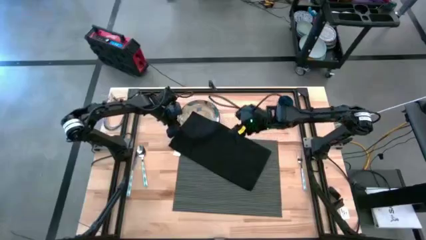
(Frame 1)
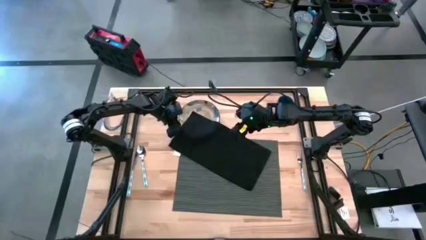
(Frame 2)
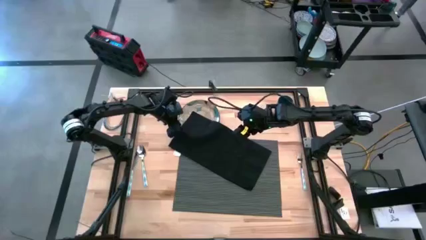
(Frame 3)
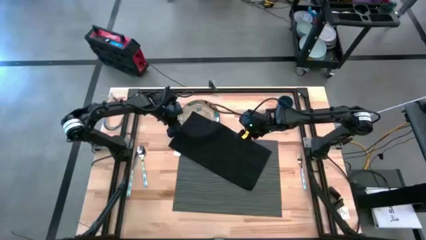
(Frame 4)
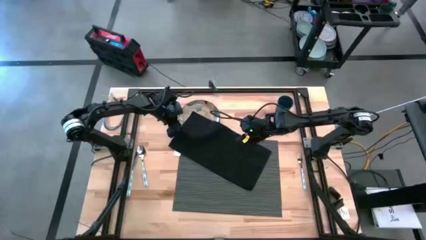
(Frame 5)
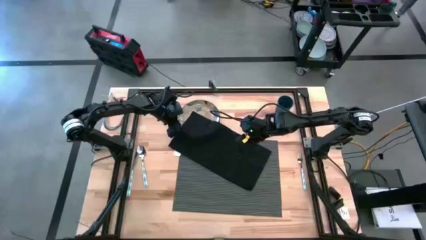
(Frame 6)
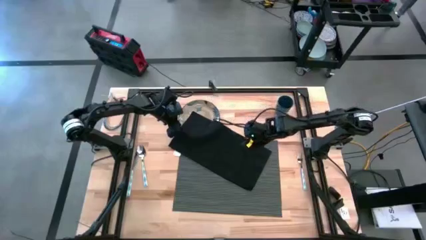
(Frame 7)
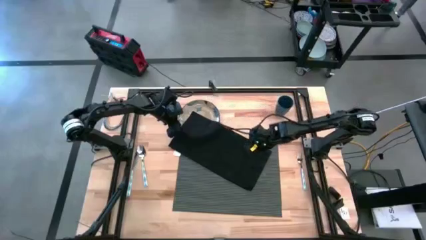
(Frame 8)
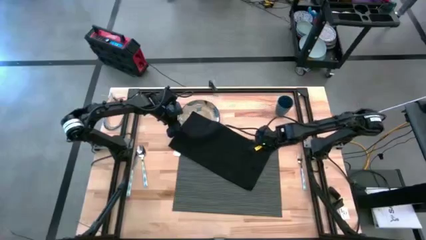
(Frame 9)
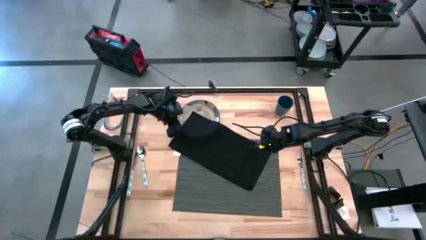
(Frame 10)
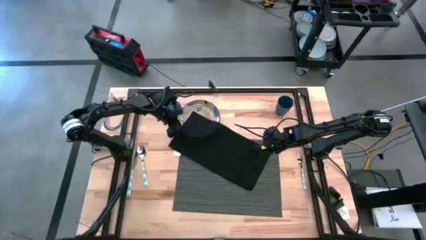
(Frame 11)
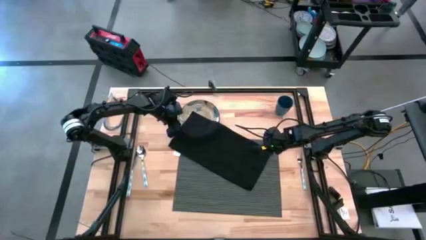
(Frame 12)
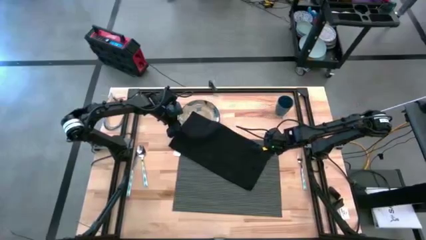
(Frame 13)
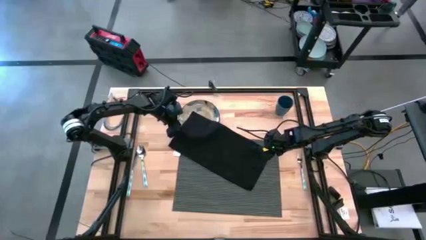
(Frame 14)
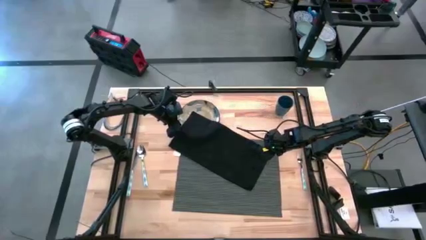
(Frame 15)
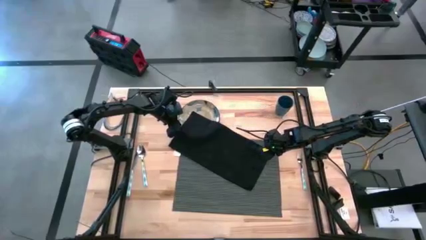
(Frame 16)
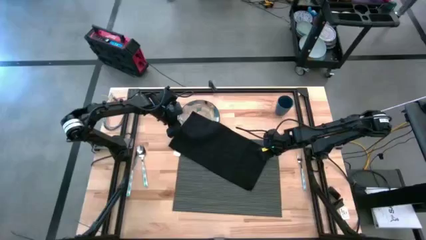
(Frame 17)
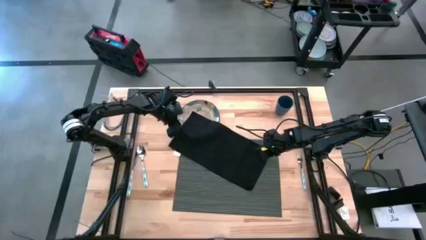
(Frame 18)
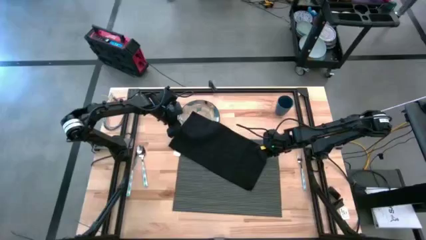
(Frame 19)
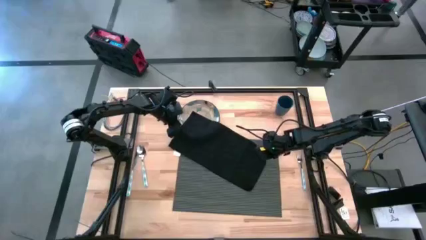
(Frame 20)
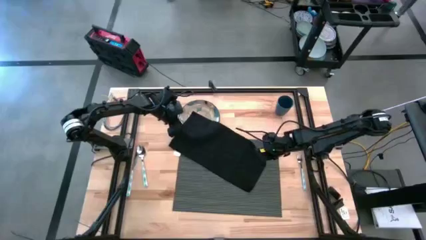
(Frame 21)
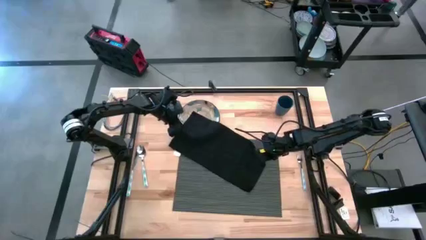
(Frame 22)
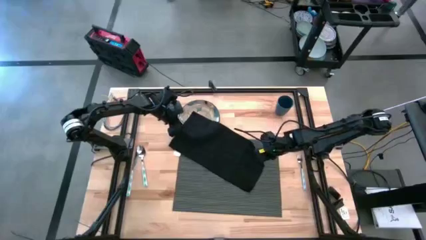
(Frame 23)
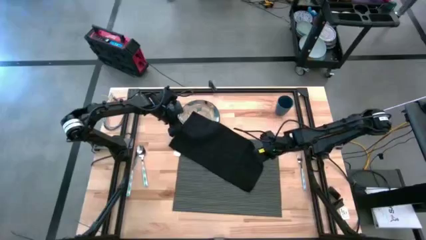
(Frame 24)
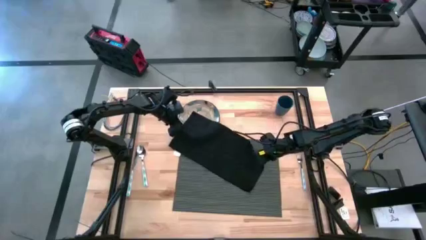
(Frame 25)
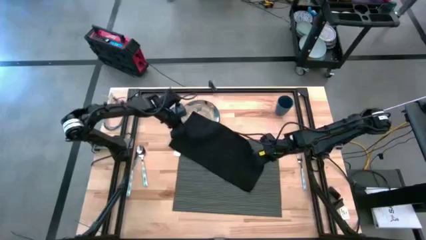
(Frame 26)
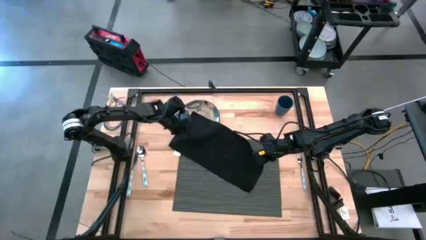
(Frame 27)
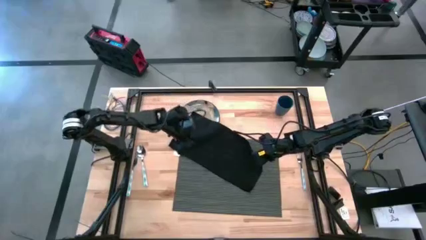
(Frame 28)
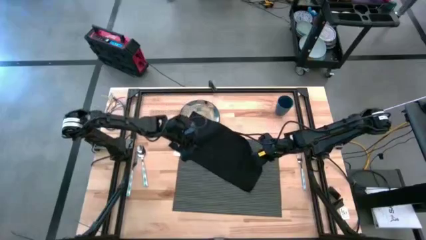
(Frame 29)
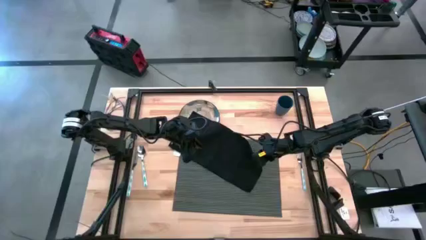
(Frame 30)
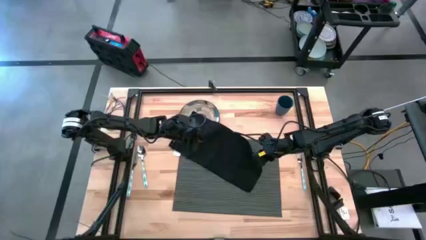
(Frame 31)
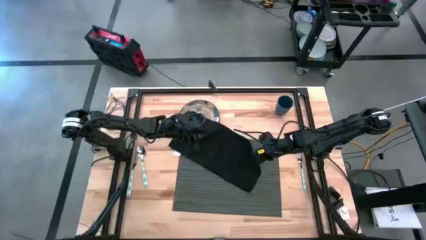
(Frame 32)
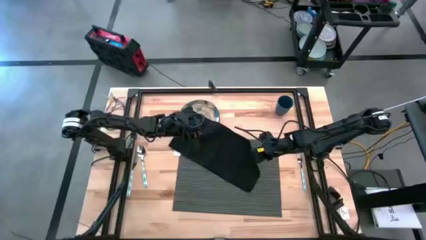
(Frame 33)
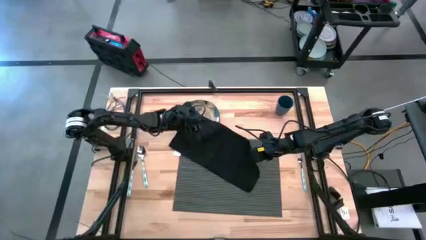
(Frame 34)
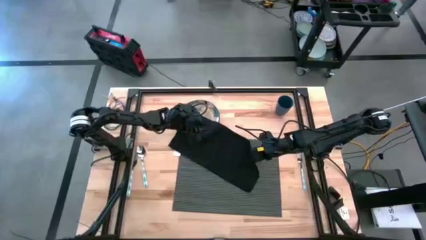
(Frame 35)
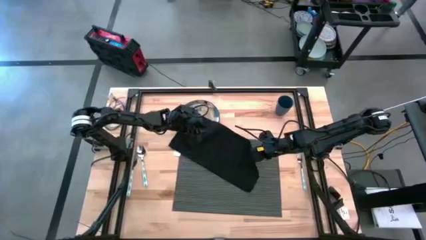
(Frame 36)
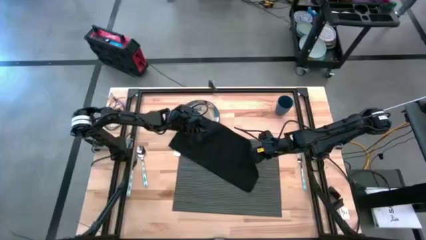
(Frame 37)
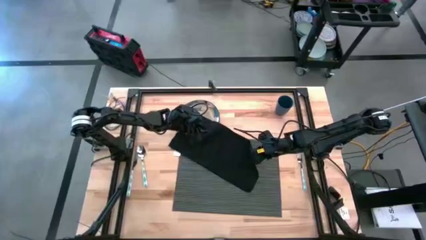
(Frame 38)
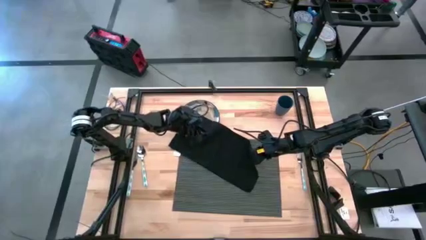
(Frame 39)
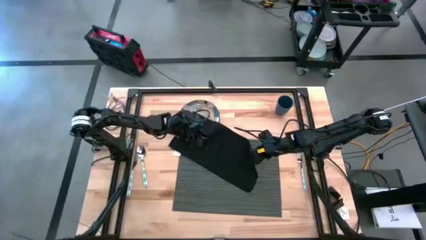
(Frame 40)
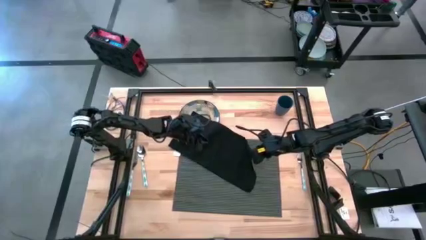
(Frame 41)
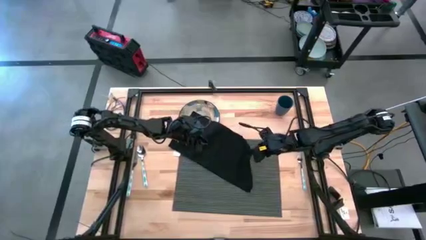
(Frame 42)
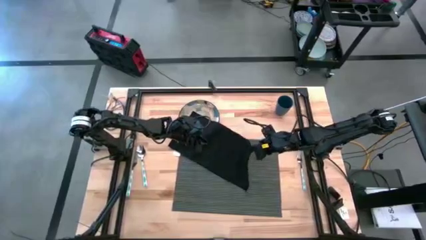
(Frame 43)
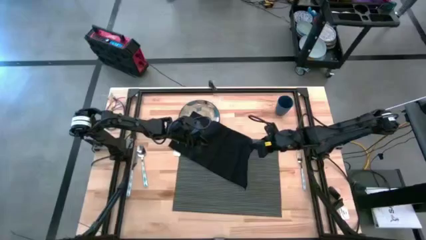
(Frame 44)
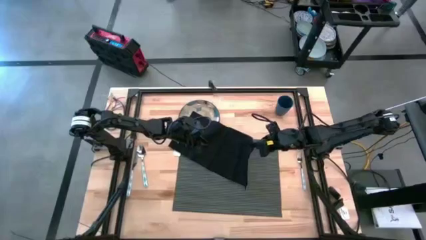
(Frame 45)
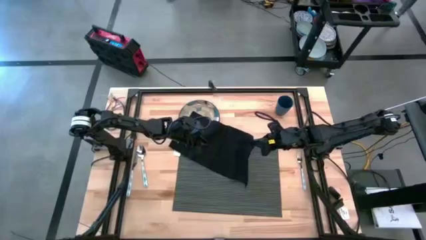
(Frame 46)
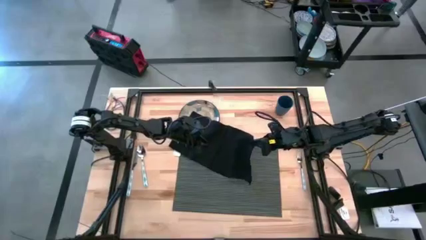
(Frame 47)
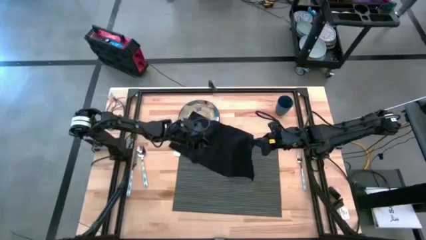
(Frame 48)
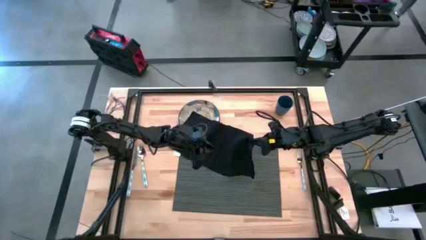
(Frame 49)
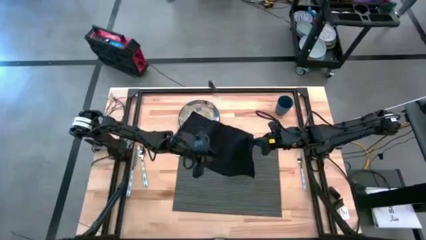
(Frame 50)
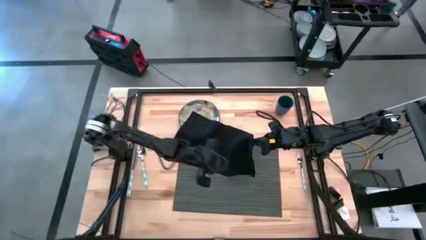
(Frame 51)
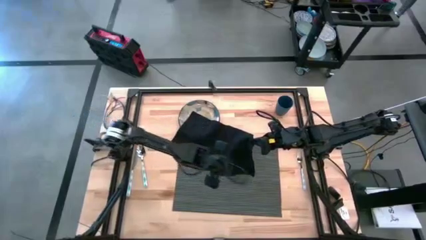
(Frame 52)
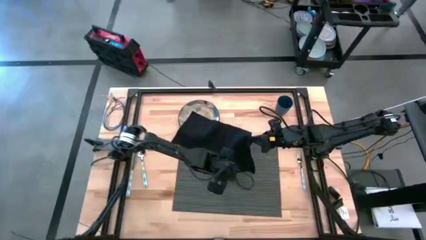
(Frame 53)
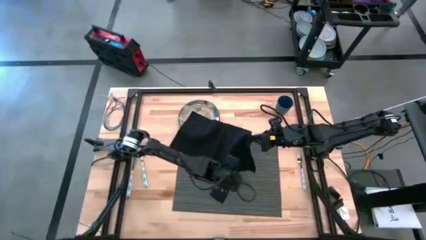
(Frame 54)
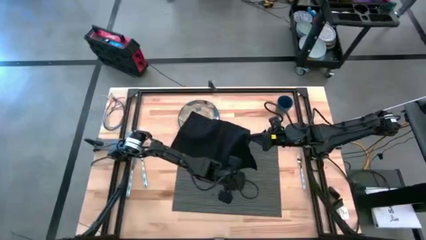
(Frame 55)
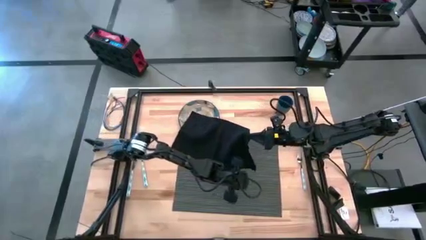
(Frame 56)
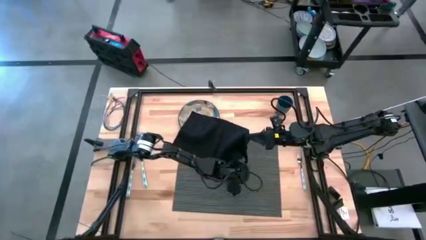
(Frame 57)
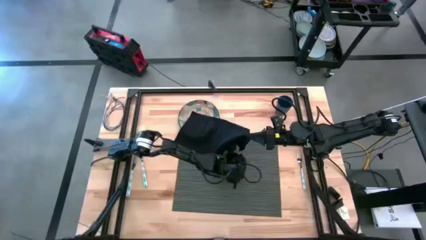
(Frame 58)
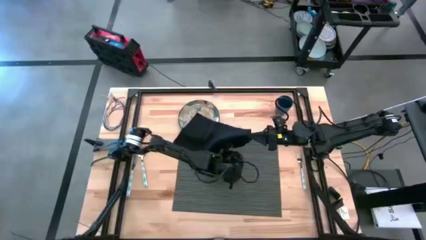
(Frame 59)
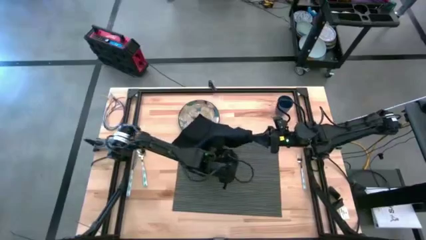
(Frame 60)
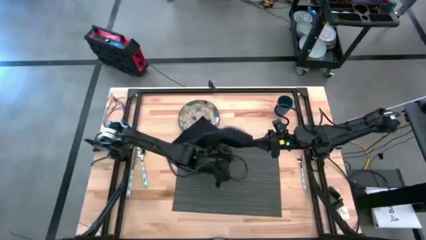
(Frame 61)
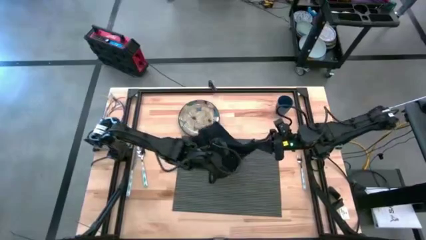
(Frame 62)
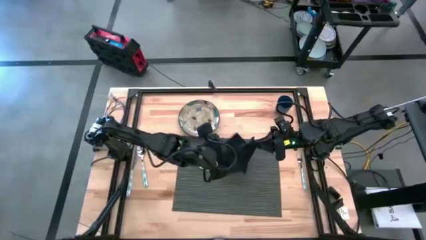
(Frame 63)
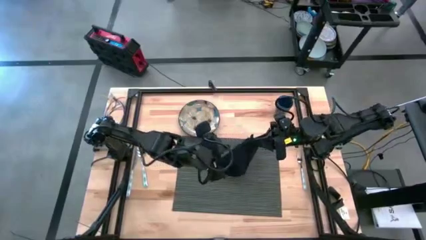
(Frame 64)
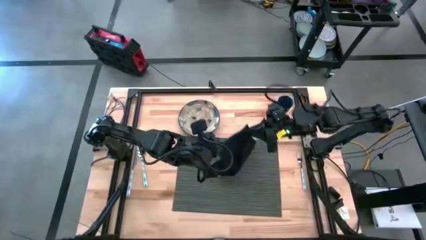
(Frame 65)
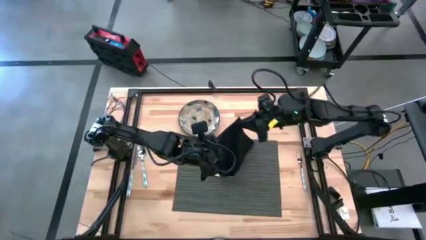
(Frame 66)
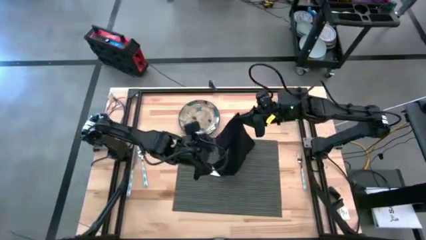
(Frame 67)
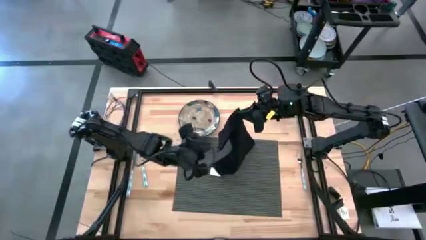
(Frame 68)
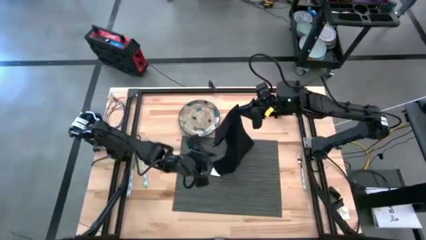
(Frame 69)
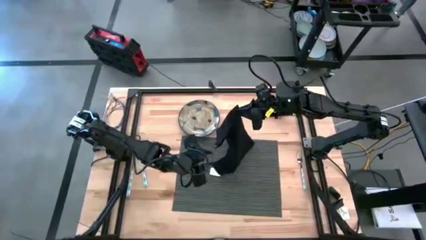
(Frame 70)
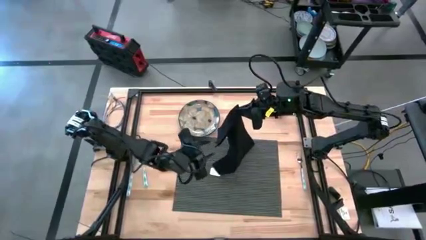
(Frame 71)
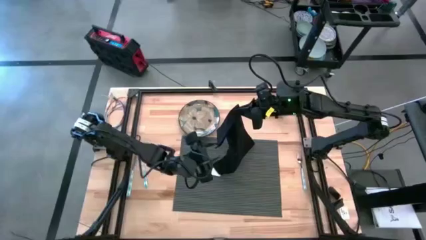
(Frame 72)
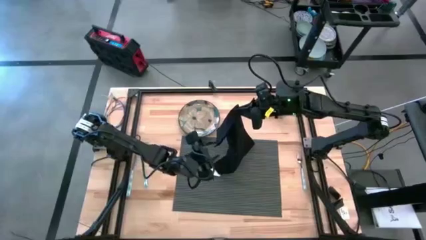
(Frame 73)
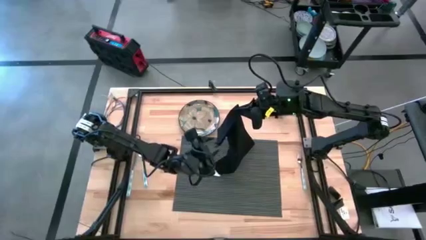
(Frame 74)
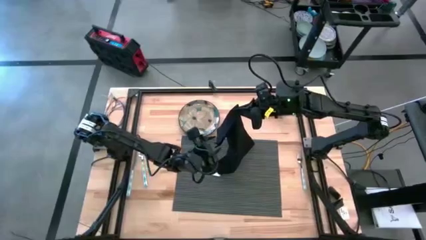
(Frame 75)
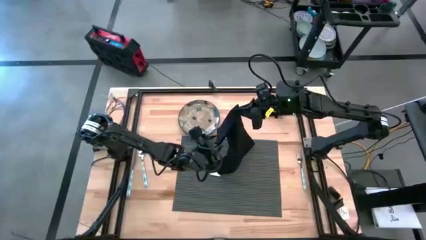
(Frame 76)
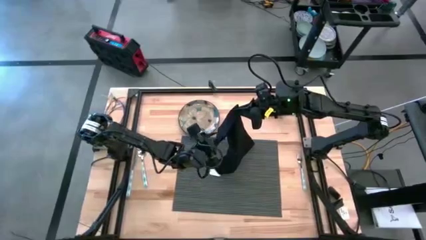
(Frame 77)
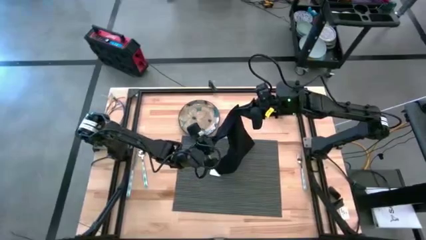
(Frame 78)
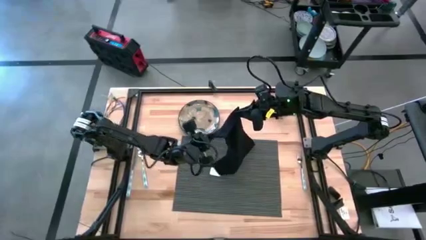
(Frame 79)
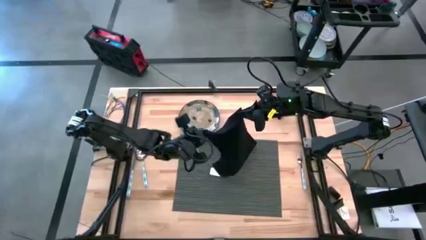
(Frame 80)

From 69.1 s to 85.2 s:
Task: Set table place
Fold the black napkin
